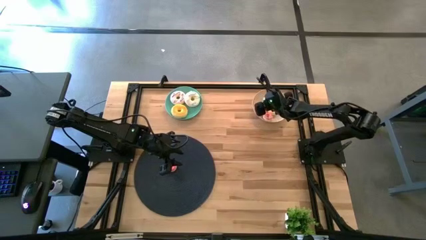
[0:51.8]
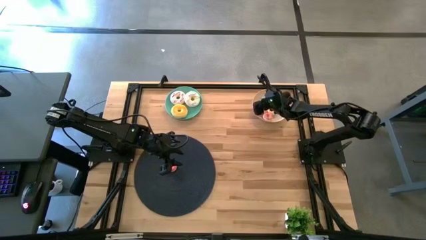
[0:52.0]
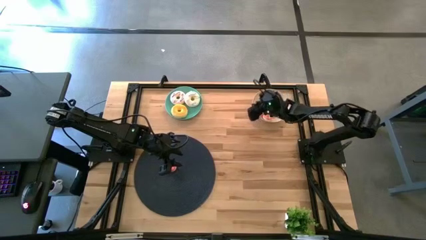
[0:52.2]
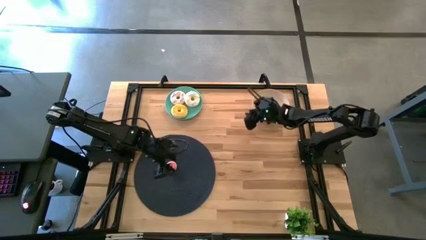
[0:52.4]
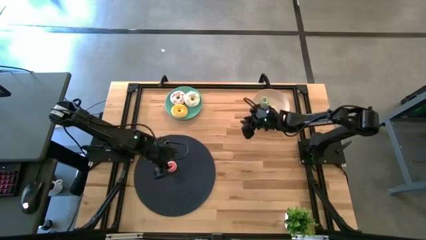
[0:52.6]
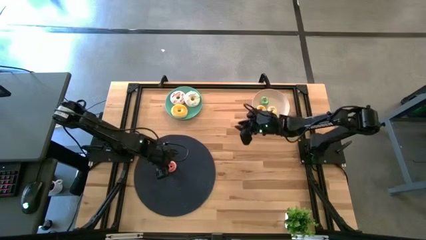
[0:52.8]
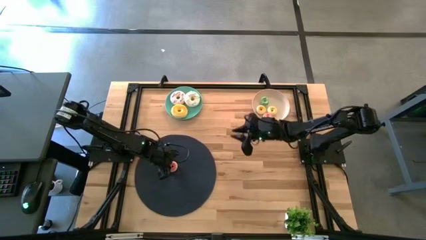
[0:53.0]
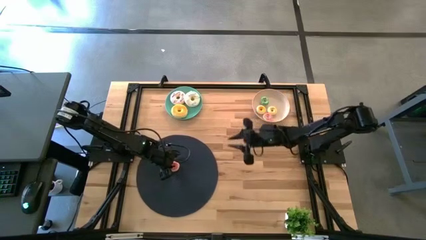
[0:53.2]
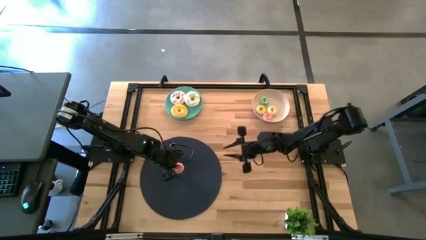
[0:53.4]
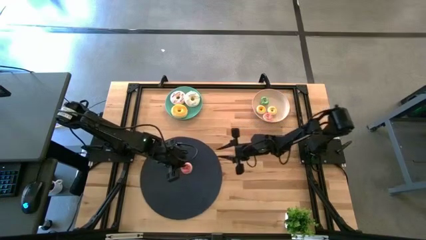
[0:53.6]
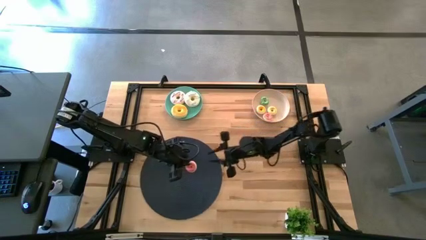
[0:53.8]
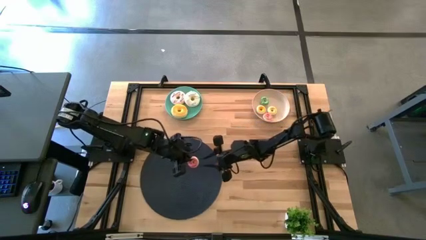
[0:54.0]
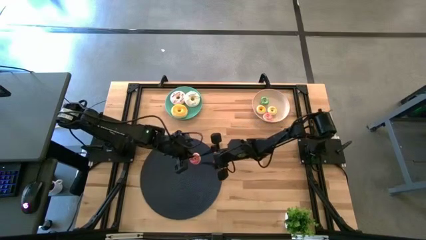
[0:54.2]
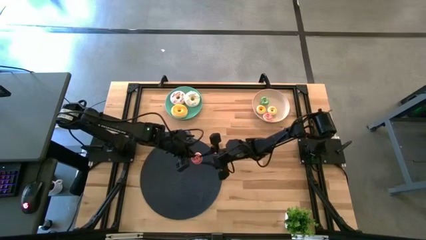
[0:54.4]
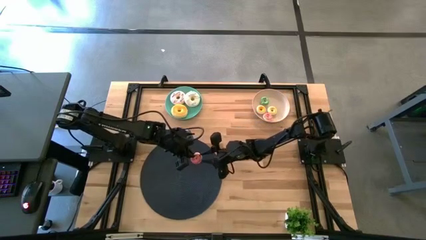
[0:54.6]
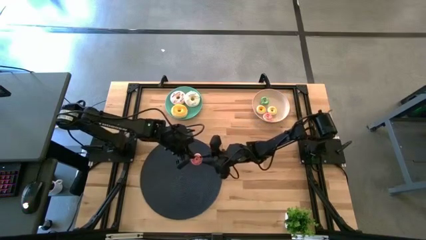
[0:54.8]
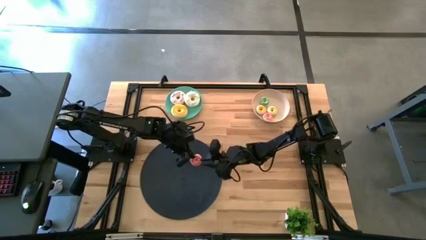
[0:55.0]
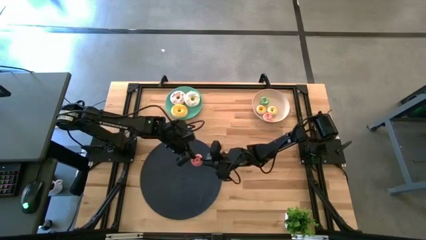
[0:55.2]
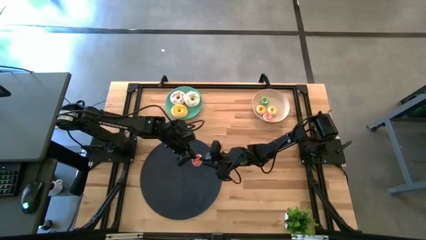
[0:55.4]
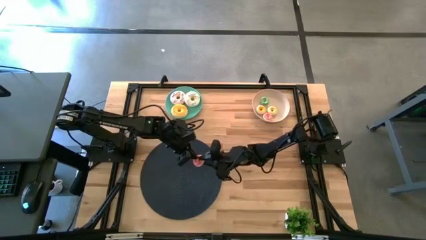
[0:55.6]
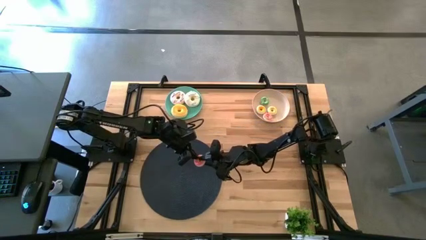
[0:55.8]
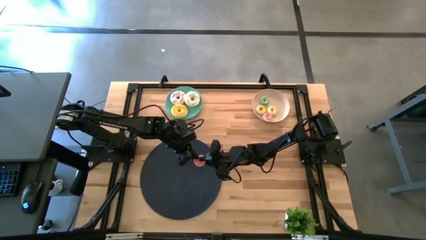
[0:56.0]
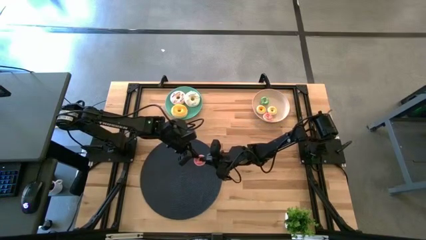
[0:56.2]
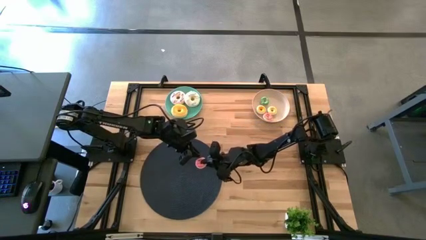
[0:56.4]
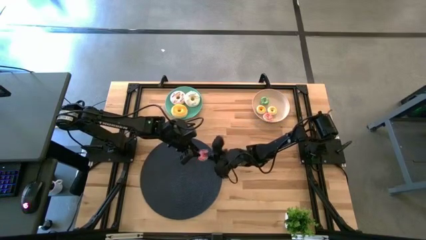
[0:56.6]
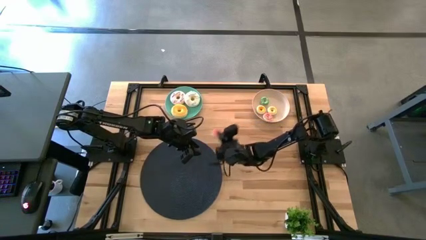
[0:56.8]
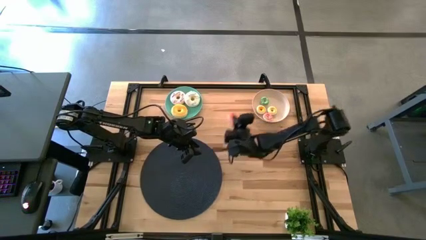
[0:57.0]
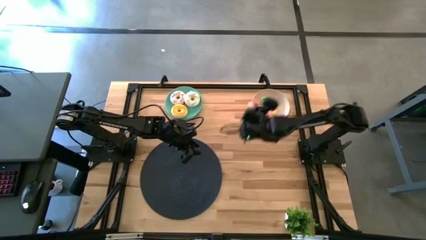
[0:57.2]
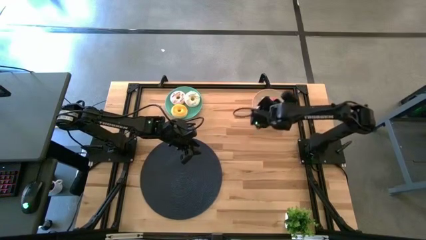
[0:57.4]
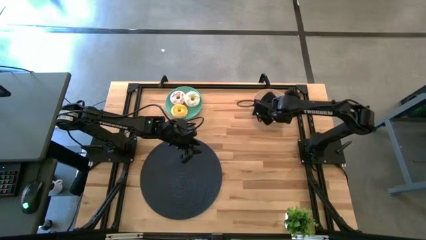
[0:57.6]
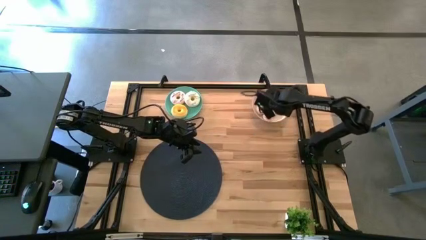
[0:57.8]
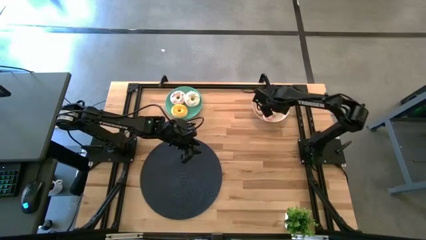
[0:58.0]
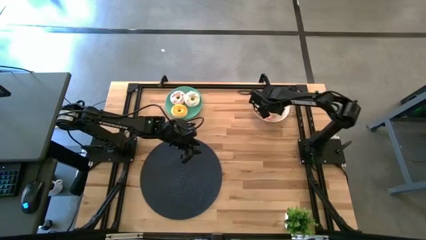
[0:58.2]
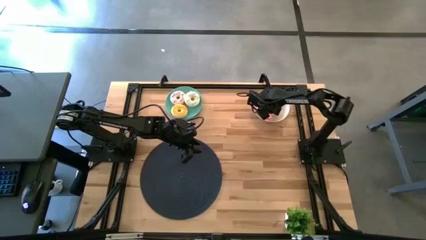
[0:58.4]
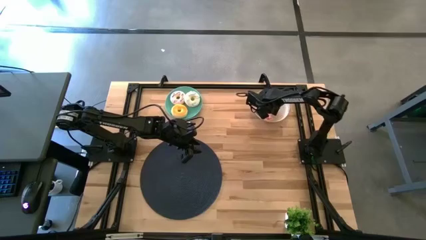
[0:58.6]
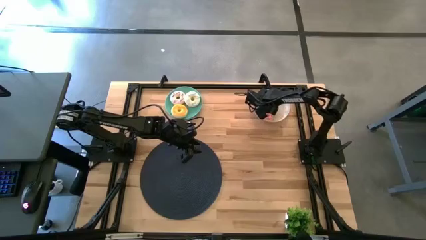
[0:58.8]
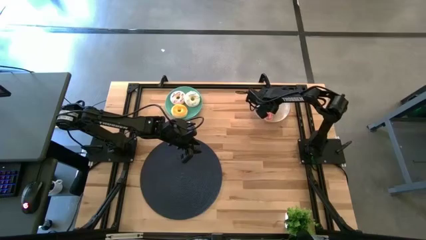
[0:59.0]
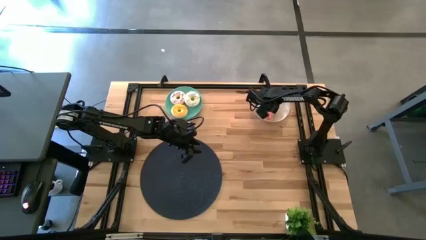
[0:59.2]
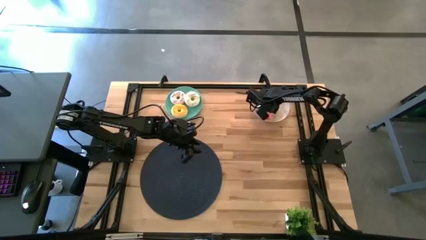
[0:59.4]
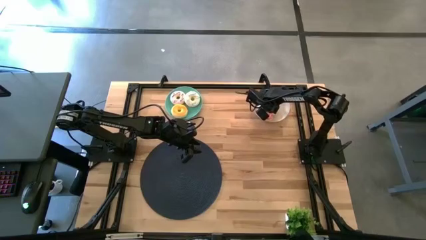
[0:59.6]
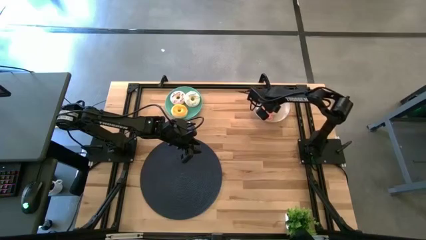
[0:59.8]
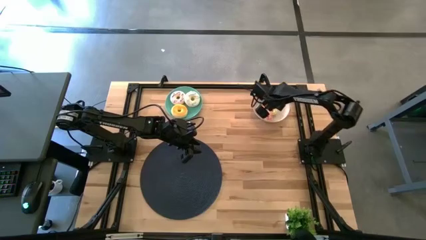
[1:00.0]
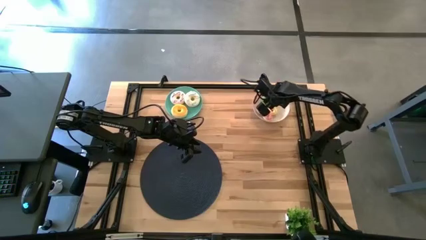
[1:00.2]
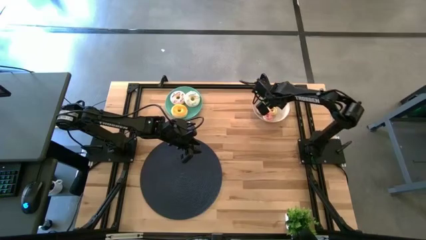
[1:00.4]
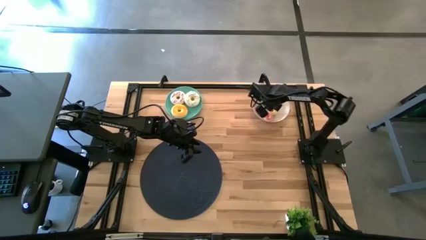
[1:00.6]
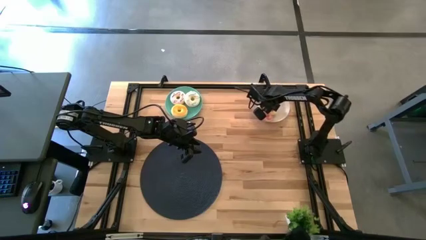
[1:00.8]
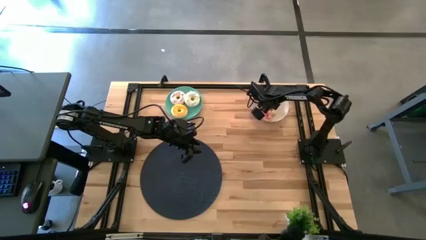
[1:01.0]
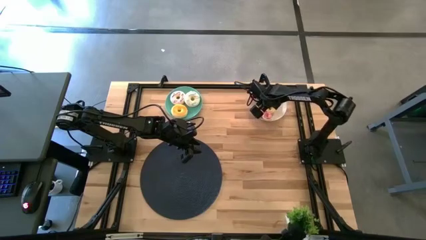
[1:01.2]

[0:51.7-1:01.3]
Task: Pick & Place donuts
Put the small pink donut on the white plate

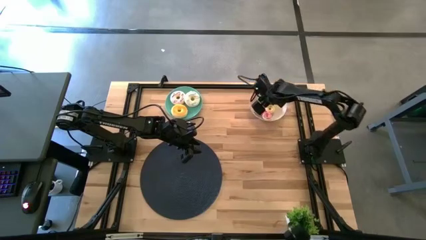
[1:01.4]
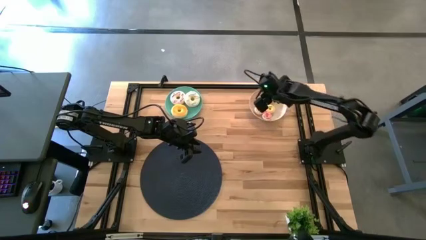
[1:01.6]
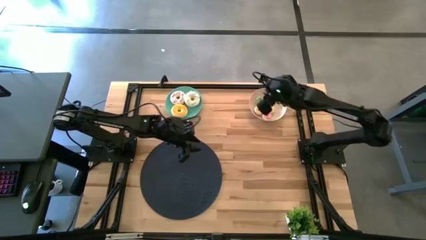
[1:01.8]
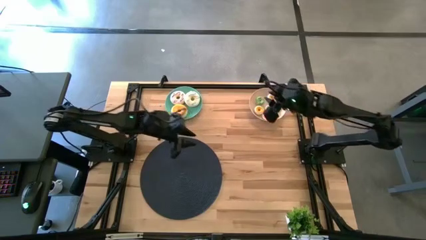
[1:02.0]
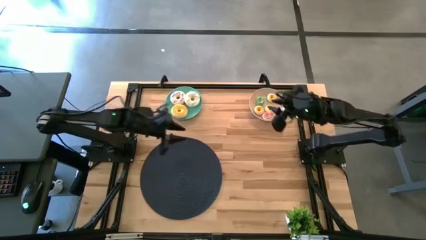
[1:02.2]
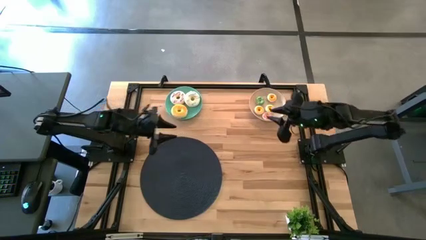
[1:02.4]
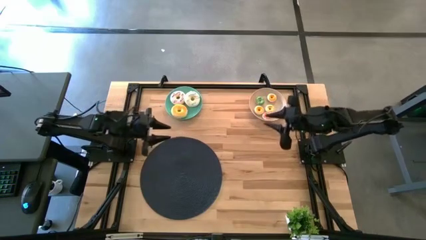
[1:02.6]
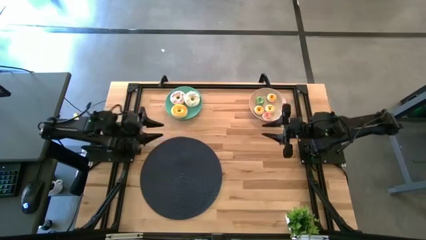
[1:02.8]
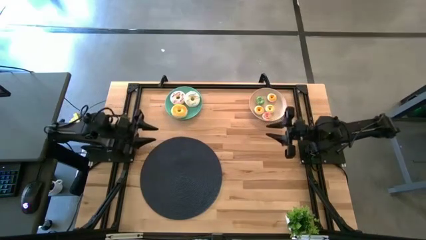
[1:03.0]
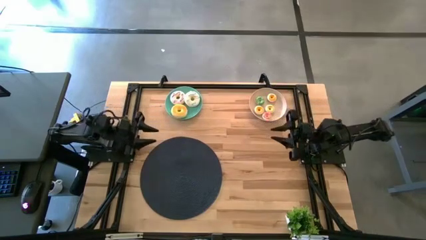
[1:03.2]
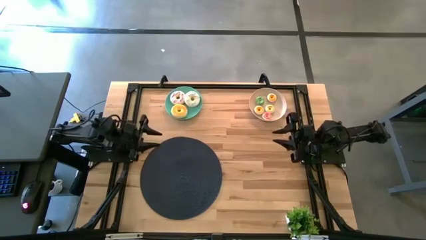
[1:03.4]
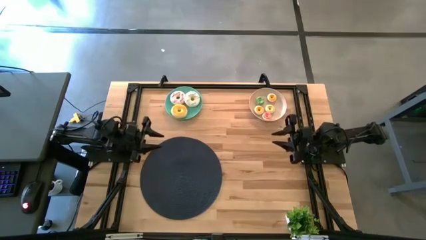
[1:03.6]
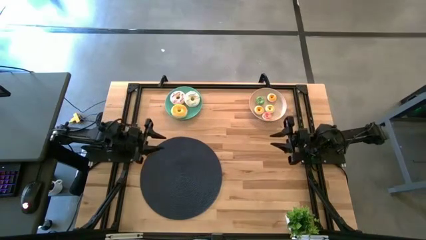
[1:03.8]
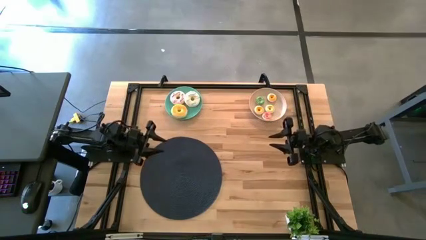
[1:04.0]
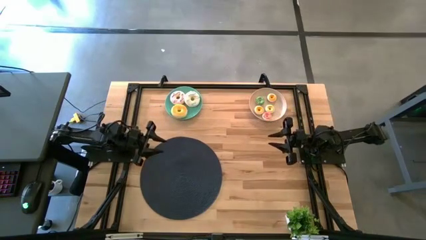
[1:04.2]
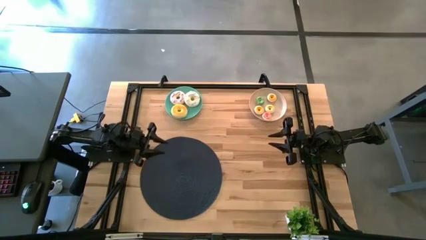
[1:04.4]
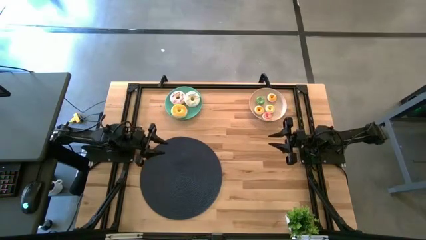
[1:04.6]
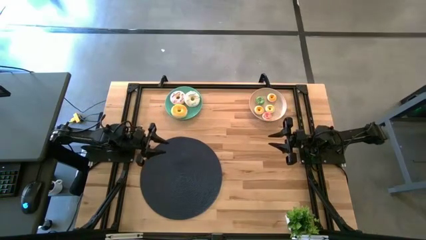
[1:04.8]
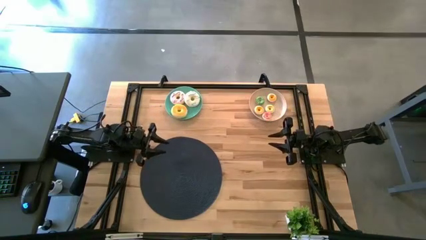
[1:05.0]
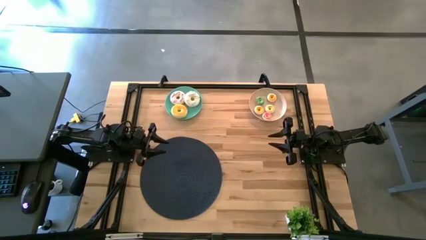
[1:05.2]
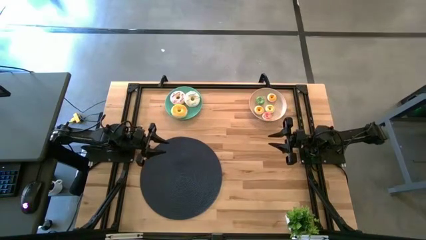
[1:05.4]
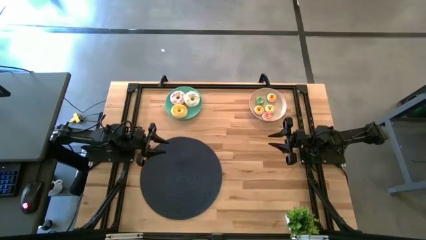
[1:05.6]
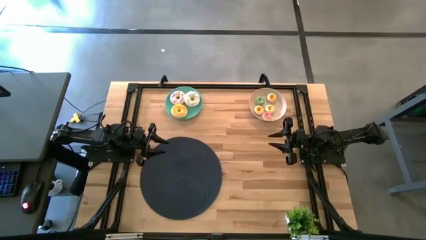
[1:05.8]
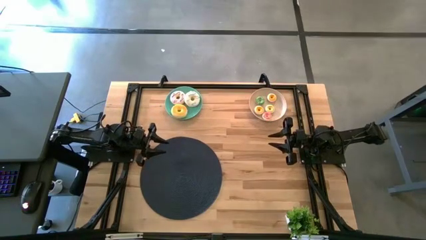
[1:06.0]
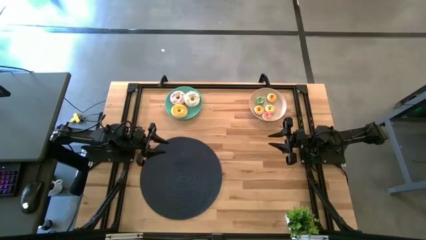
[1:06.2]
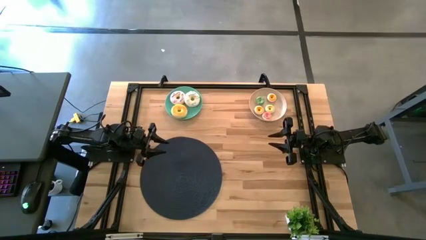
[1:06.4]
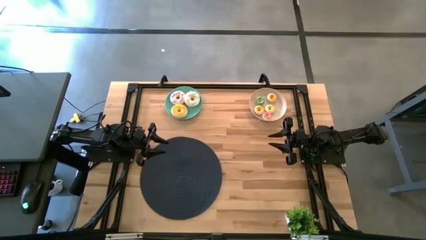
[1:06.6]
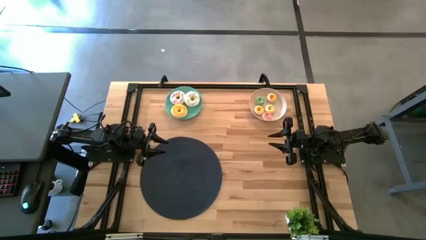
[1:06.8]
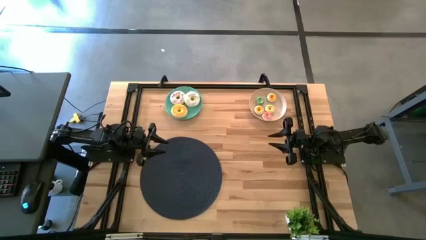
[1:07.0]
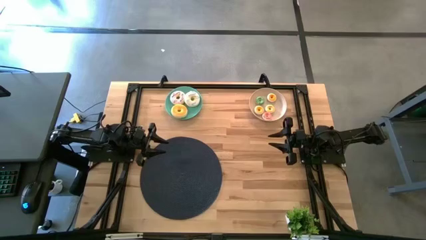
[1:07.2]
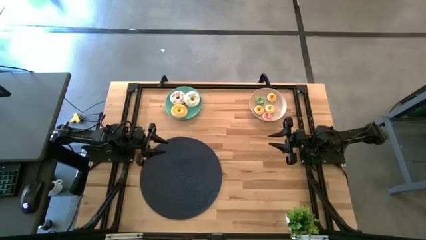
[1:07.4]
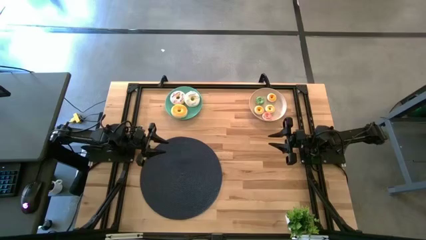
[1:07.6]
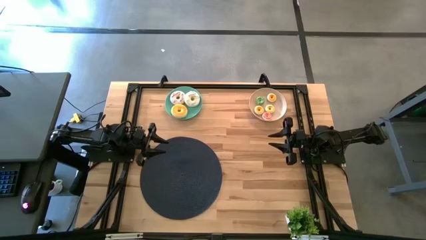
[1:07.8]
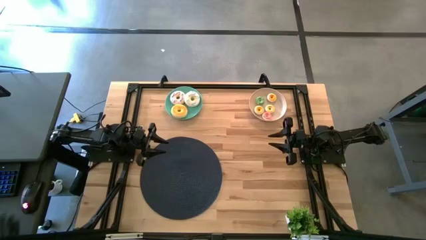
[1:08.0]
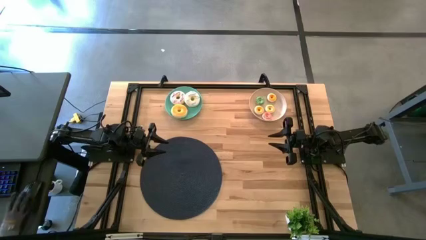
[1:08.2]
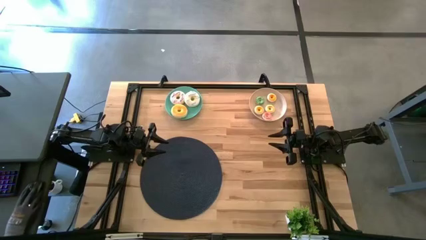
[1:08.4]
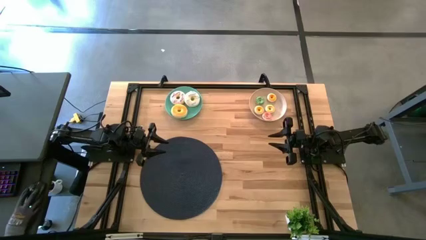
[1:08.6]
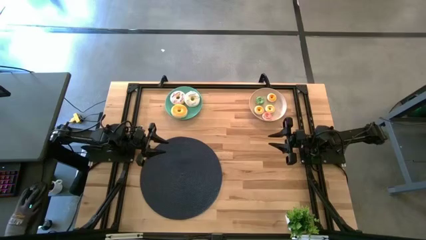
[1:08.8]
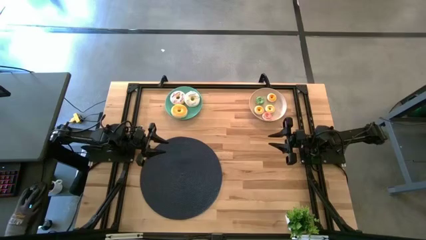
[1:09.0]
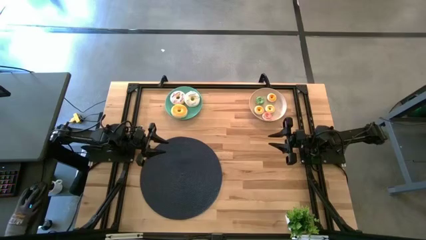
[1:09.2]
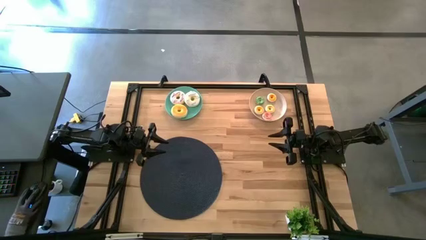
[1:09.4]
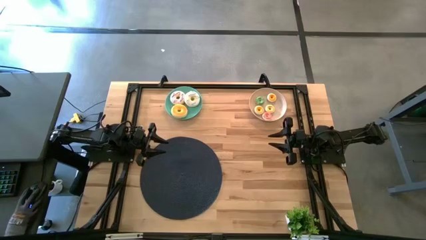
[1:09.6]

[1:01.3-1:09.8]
Return to Home Position
